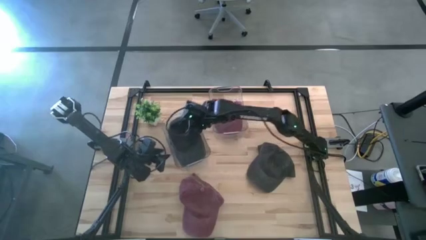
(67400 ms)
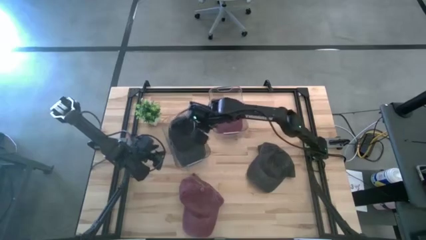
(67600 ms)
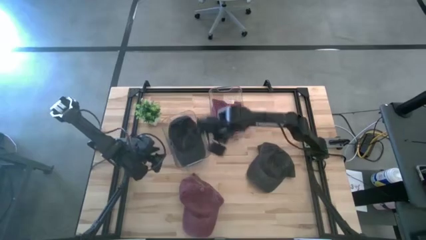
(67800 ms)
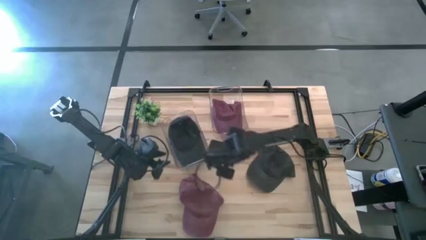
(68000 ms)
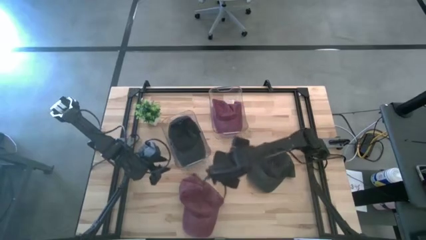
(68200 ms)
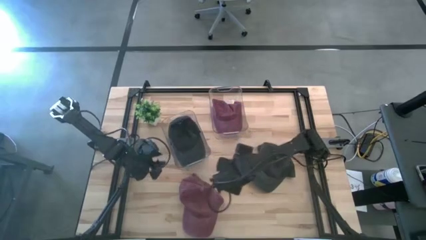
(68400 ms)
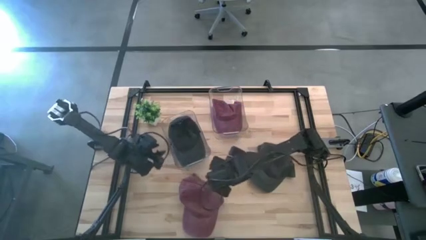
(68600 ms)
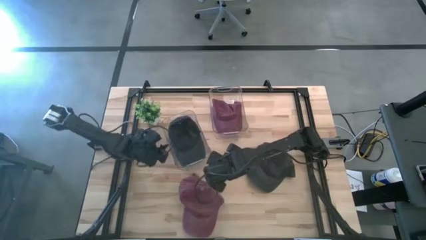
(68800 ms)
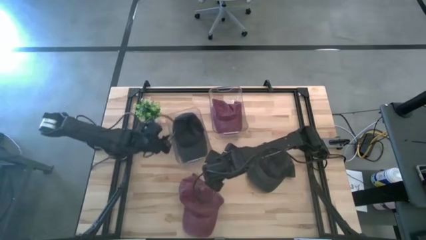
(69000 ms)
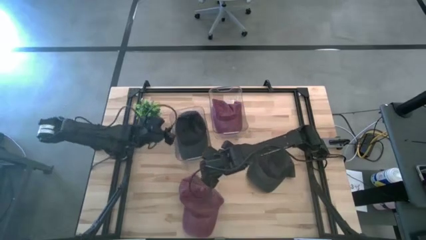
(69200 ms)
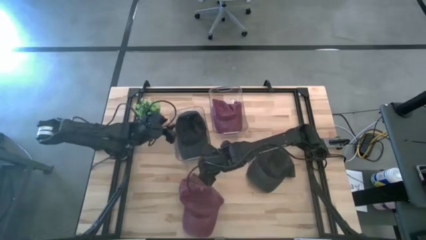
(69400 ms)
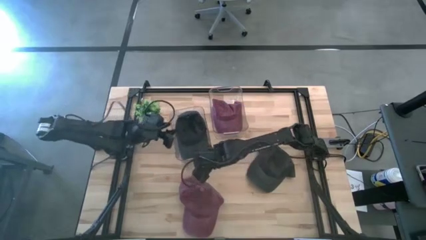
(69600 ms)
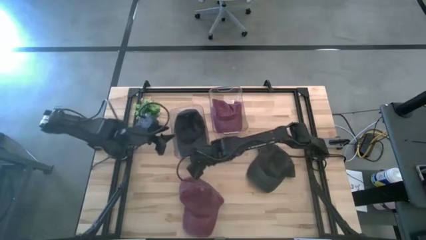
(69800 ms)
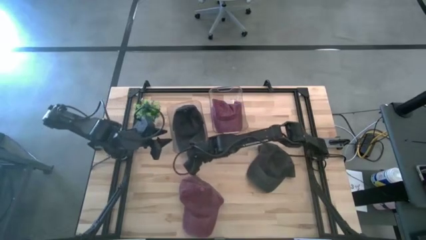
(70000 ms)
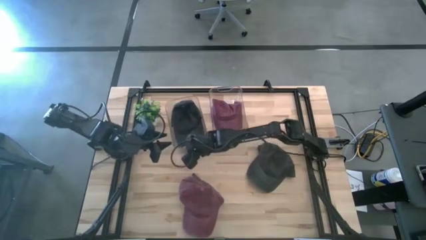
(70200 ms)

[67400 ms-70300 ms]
Task: Pick & Place hat
Move the left transparent bin to the top

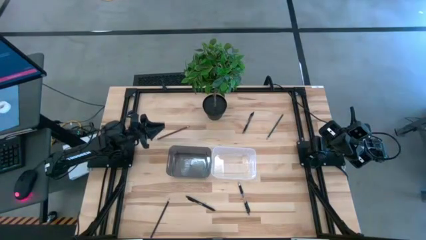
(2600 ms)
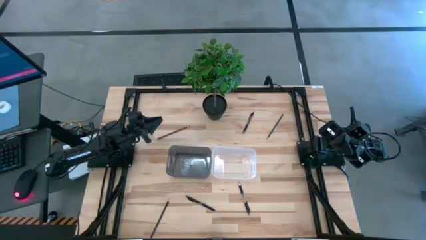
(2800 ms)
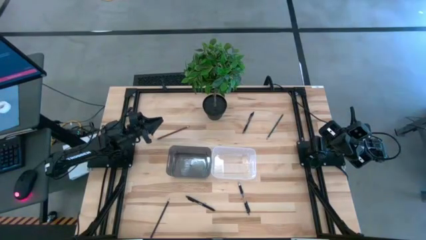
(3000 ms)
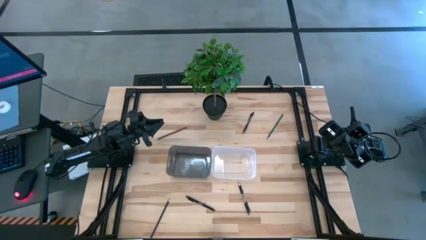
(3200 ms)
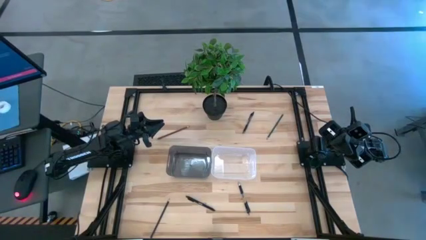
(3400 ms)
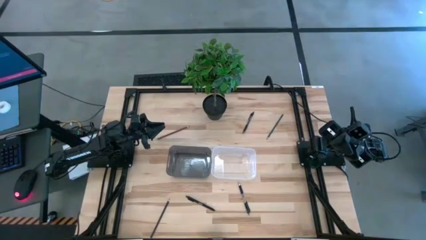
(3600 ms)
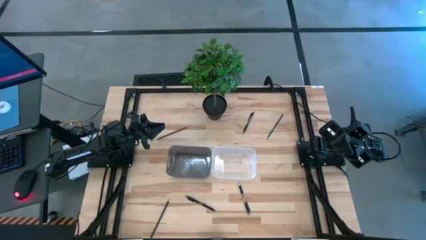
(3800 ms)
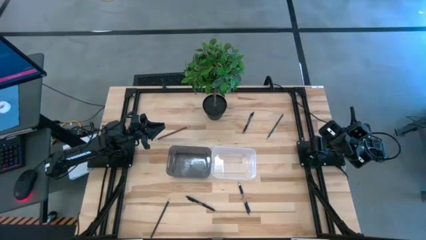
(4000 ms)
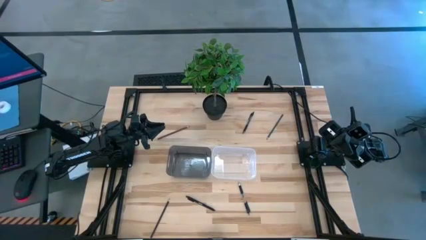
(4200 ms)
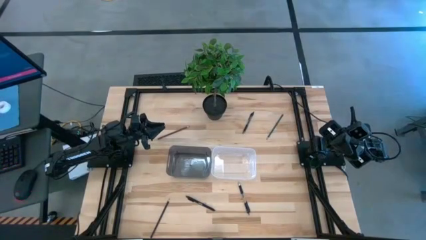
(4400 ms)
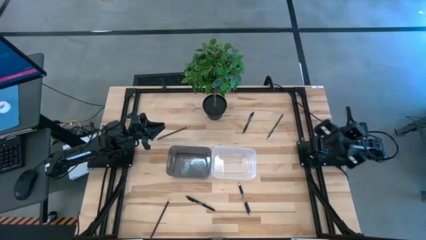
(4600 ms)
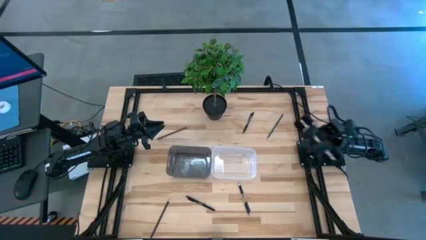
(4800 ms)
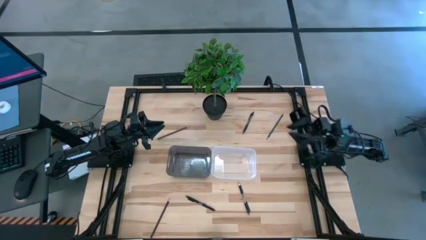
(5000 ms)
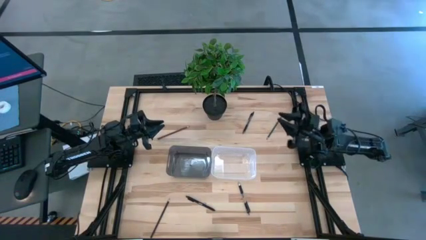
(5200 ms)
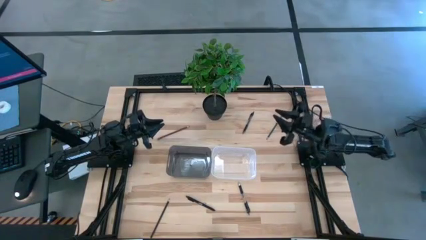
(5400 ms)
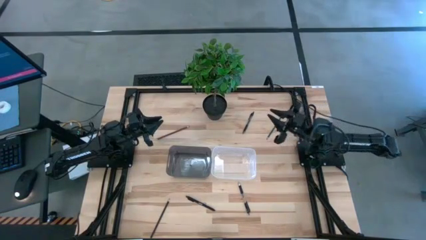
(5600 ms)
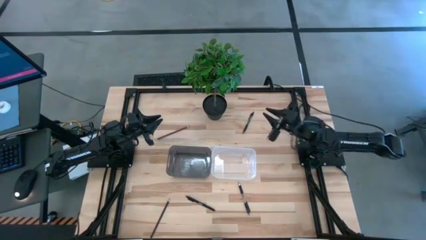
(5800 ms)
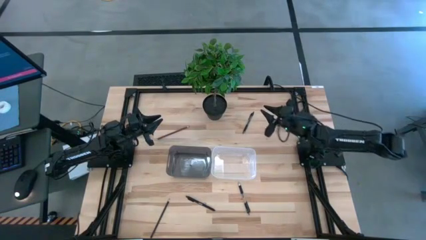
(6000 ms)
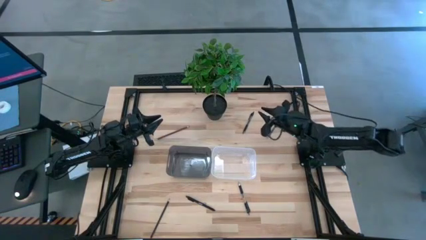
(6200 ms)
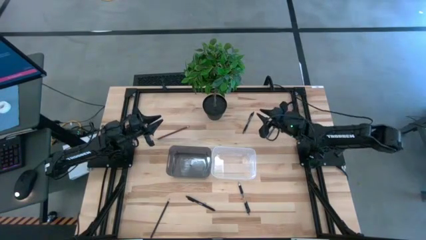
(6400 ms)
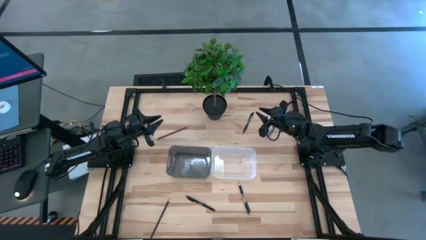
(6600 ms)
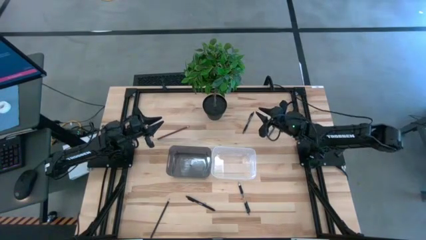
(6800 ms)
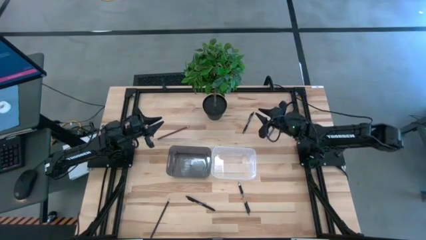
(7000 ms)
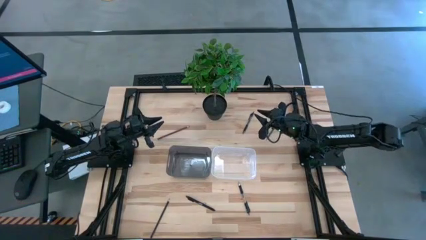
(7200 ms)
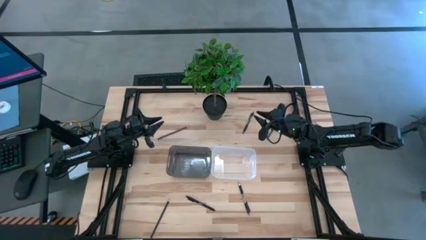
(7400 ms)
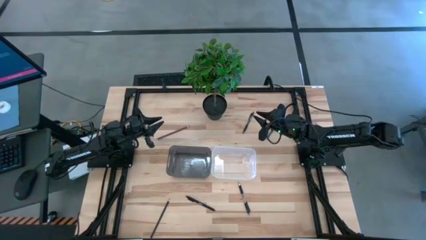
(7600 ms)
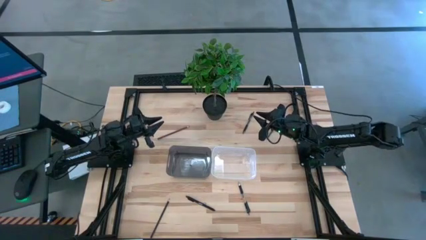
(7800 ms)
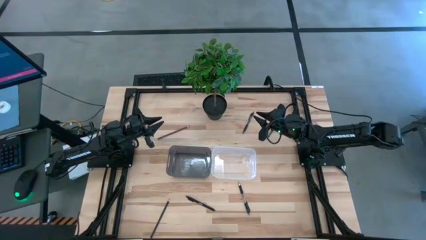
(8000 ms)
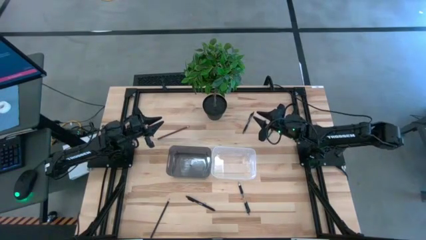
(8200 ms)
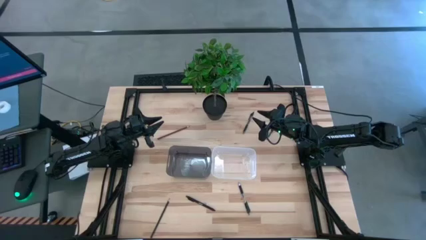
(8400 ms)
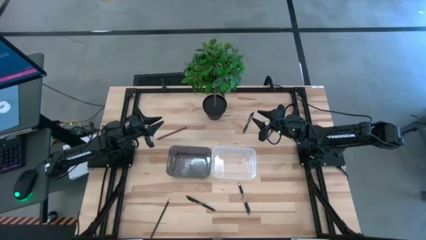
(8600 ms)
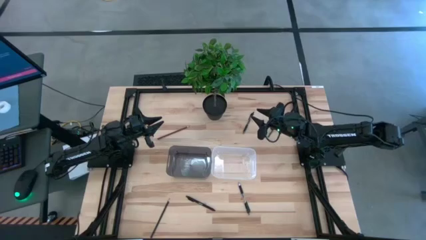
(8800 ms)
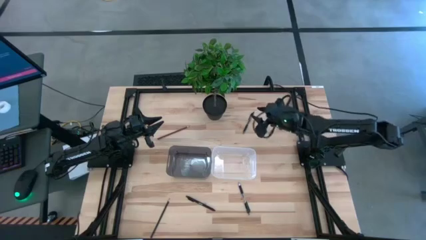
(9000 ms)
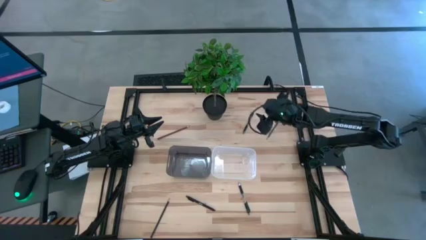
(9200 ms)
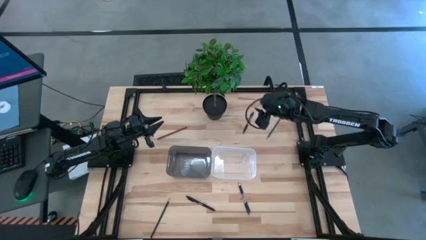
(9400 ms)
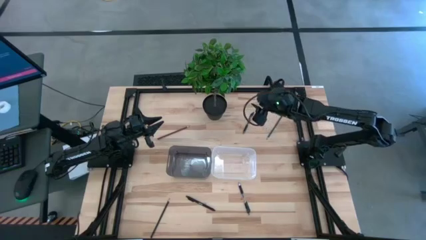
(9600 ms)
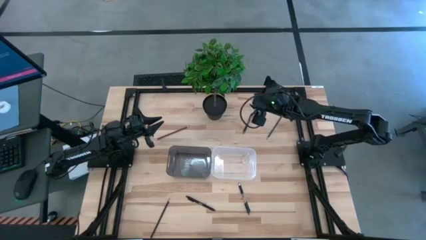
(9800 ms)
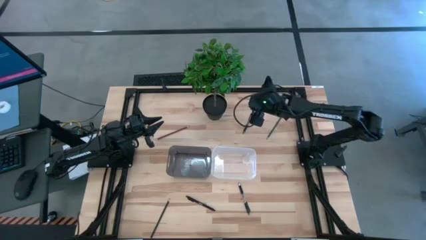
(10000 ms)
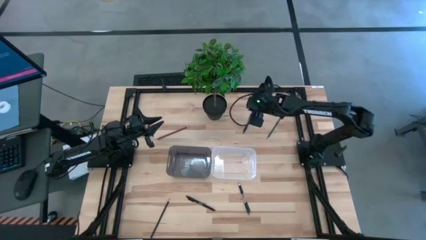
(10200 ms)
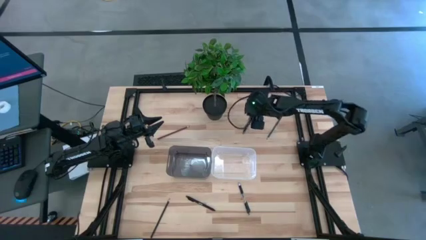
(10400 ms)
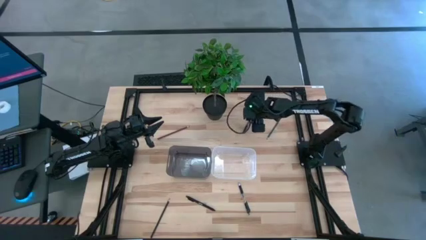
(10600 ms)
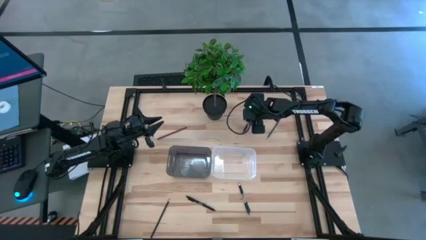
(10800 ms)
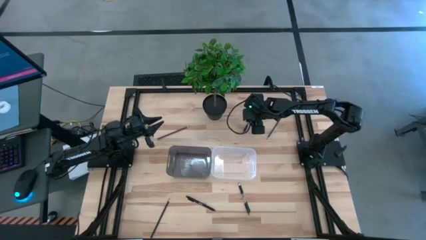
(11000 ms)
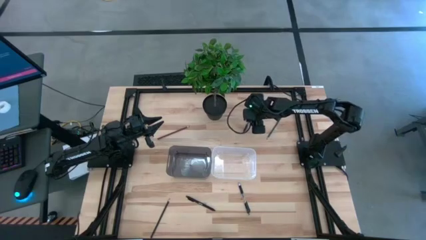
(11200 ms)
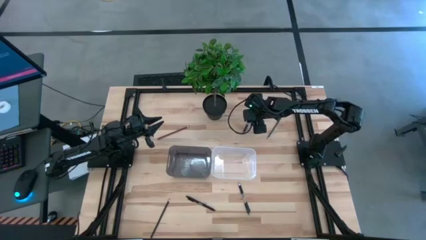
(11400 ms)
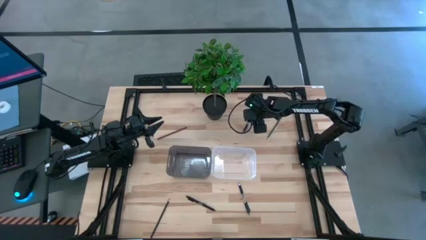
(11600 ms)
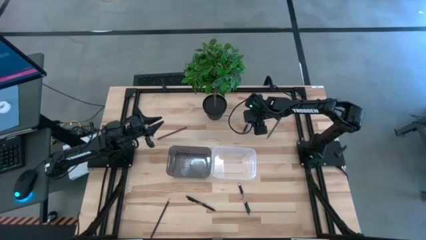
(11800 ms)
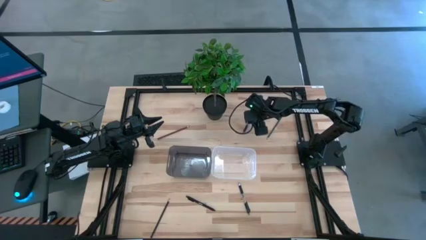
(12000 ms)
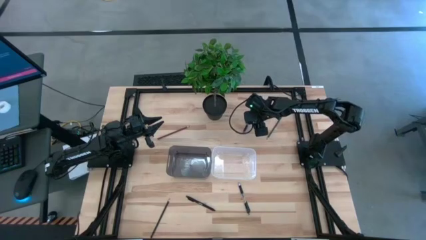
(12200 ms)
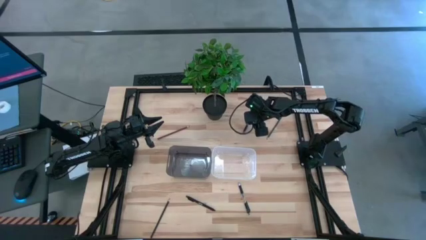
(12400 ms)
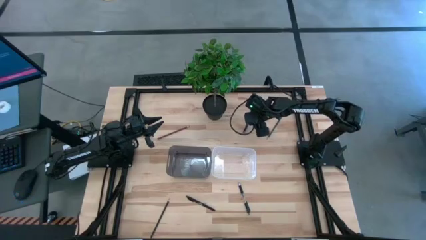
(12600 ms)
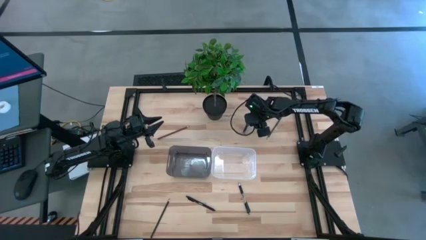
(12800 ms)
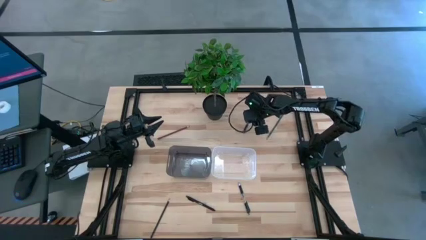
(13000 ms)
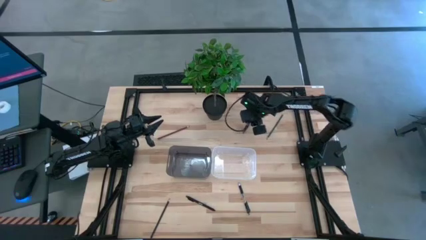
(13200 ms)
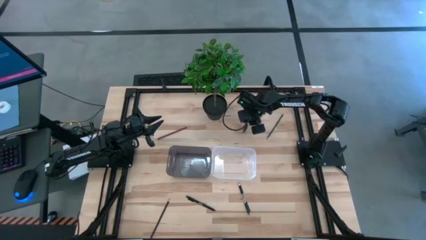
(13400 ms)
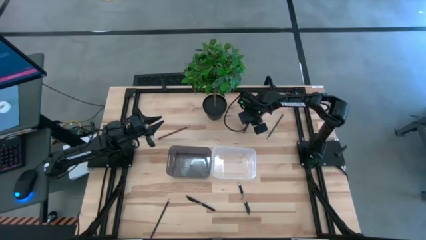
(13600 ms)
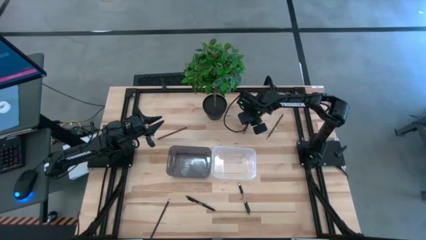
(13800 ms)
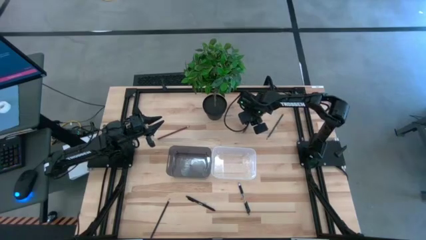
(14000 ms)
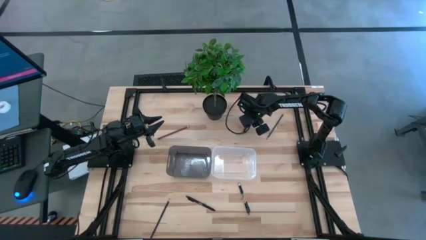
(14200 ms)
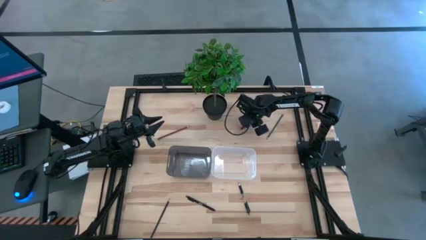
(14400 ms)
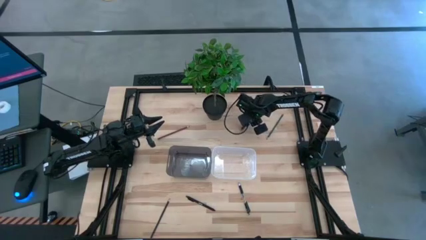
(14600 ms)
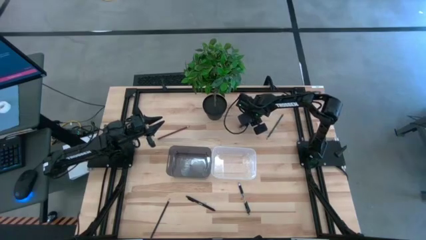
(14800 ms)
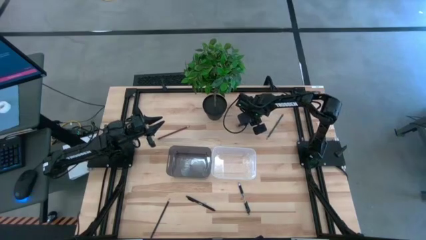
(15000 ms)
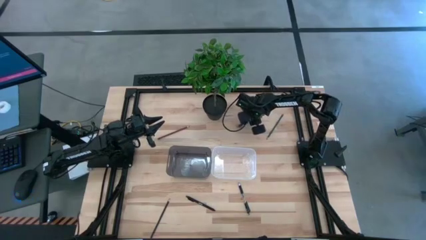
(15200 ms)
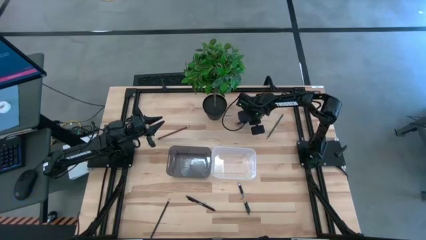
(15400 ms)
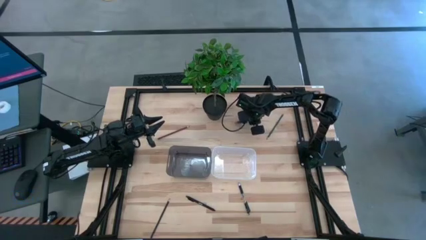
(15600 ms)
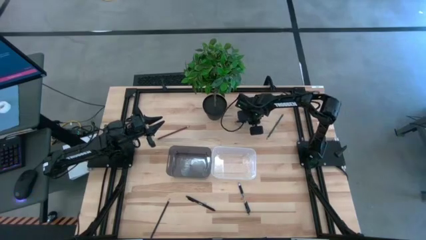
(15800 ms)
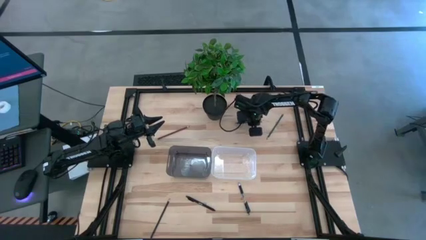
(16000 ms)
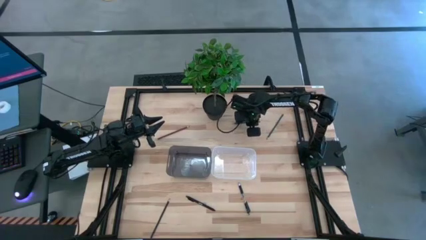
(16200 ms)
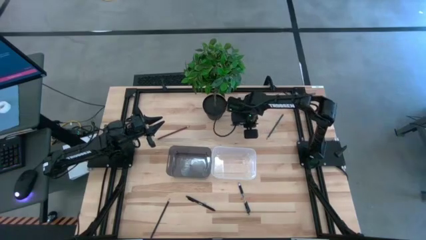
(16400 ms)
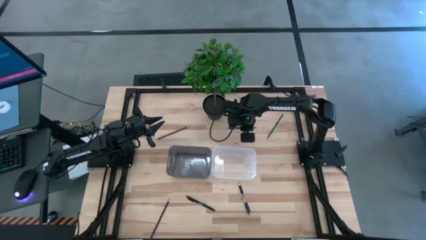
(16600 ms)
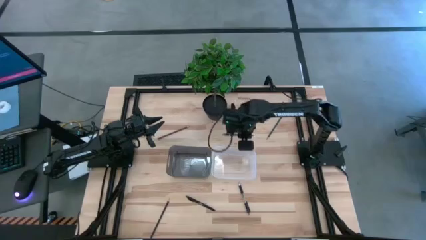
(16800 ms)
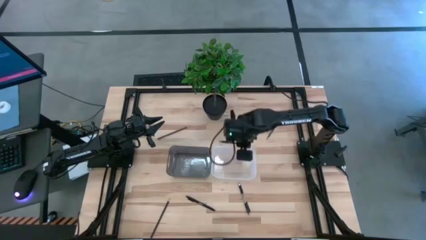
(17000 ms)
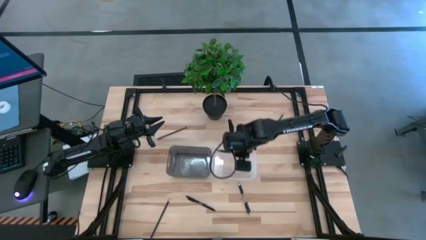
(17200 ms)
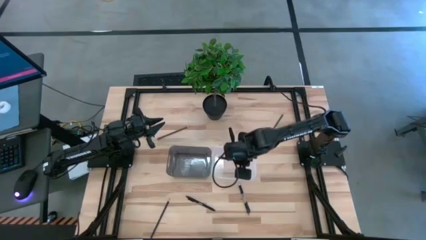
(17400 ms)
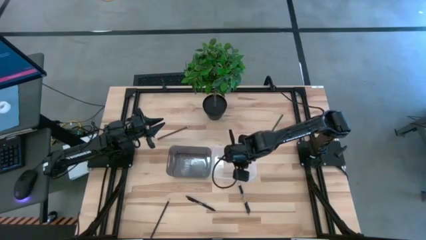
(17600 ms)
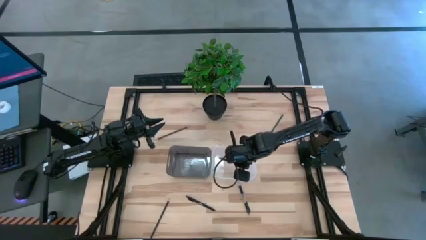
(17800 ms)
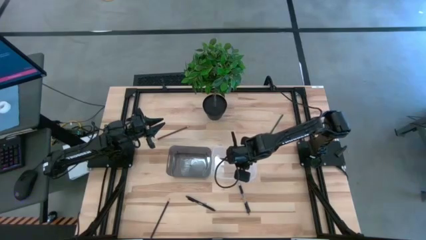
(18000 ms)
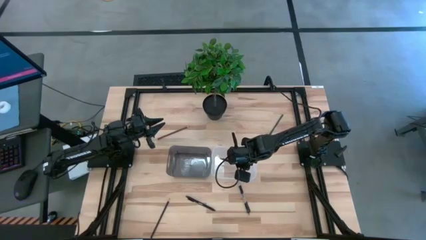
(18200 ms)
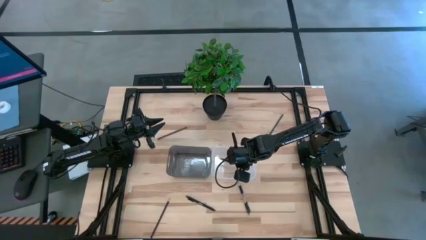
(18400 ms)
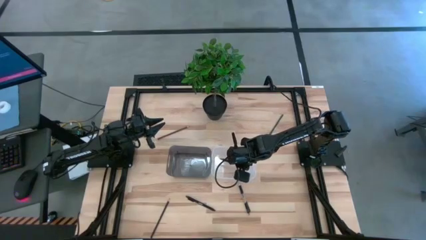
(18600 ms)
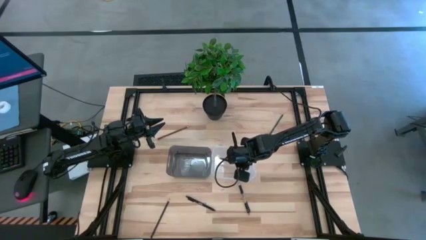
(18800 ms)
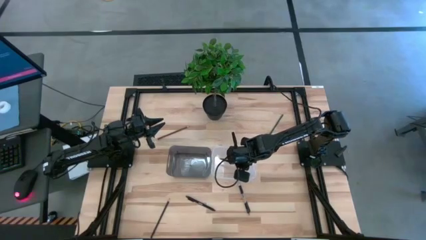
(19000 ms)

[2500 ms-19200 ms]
Task: Sort pens & pencils
Put the top right black pen into the transparent bin
